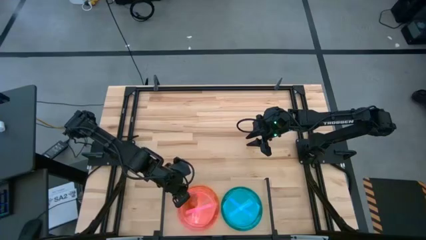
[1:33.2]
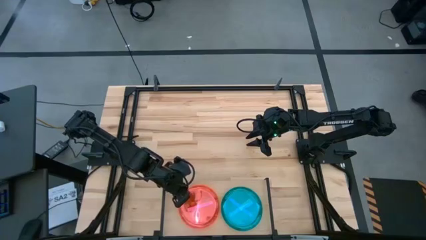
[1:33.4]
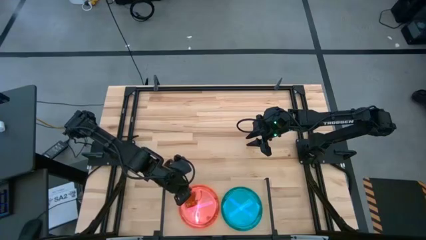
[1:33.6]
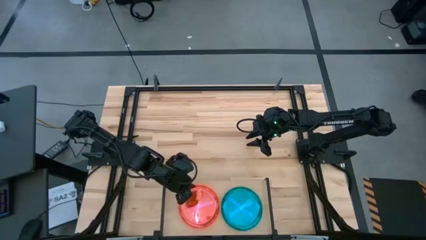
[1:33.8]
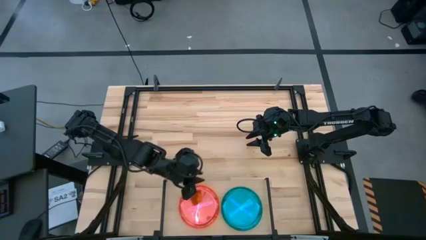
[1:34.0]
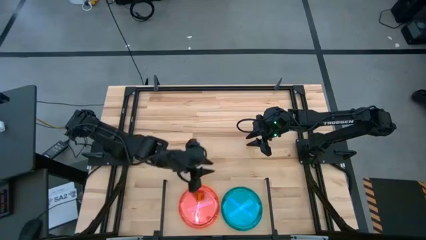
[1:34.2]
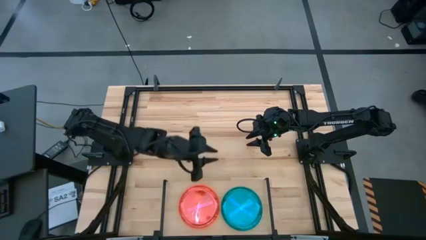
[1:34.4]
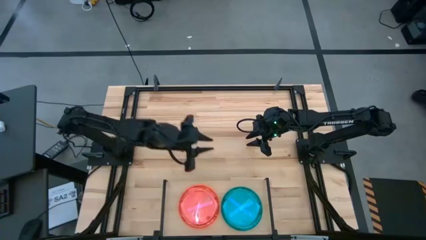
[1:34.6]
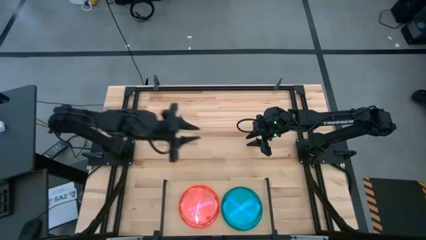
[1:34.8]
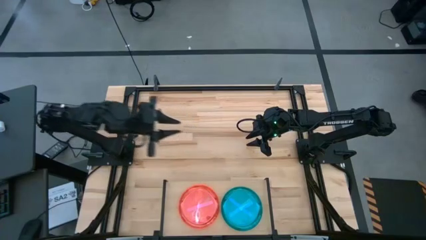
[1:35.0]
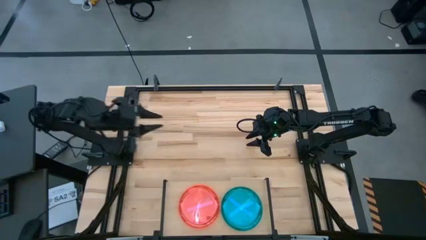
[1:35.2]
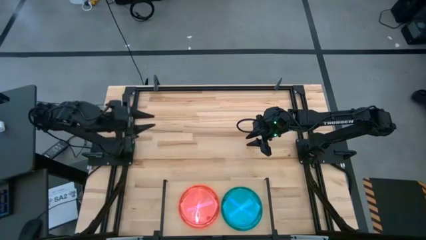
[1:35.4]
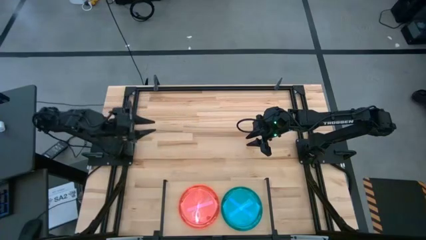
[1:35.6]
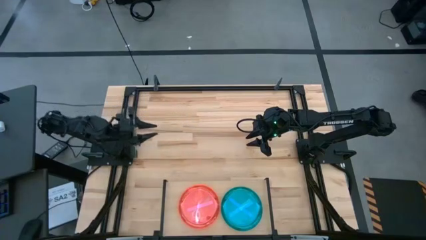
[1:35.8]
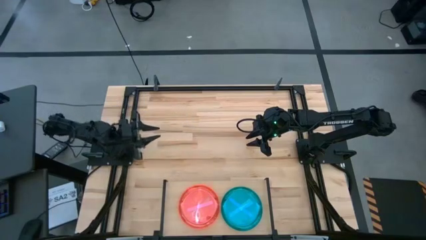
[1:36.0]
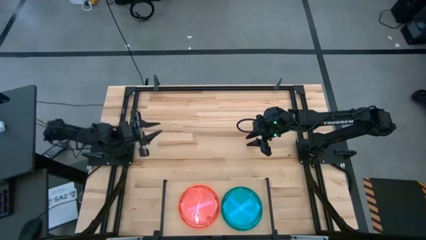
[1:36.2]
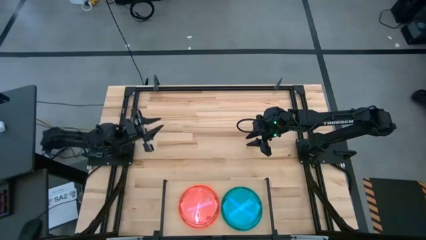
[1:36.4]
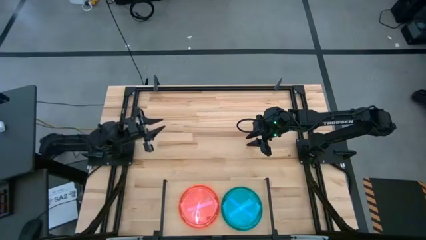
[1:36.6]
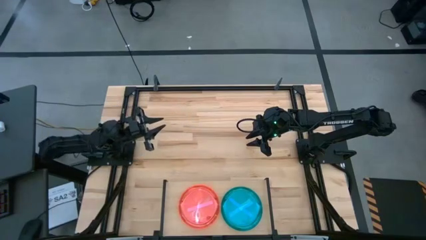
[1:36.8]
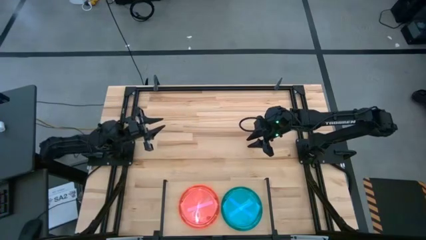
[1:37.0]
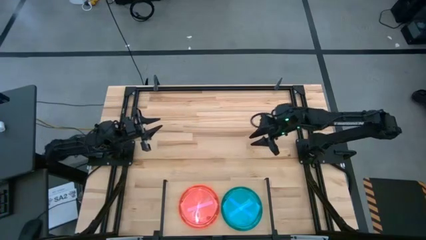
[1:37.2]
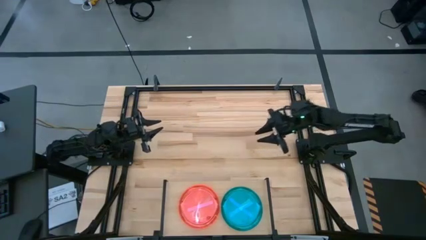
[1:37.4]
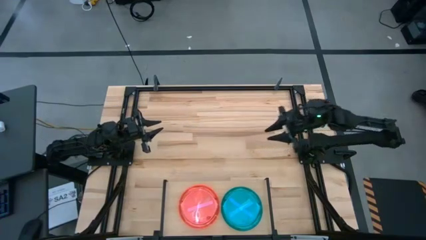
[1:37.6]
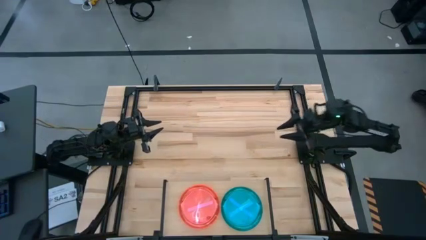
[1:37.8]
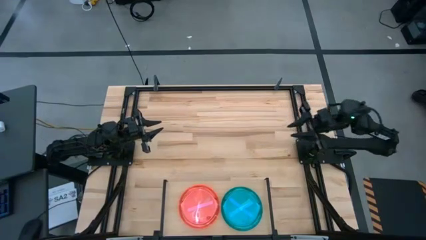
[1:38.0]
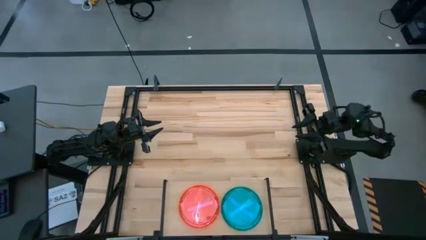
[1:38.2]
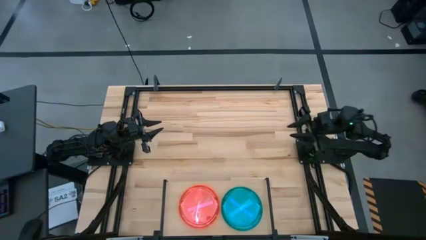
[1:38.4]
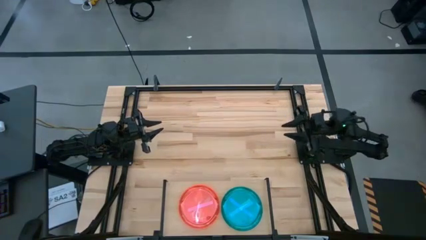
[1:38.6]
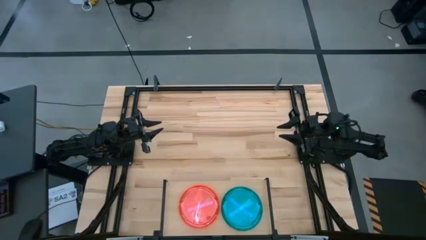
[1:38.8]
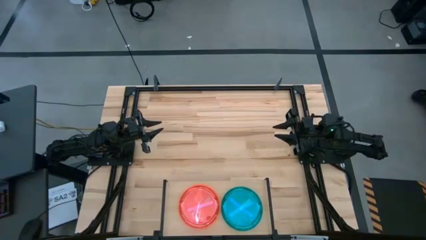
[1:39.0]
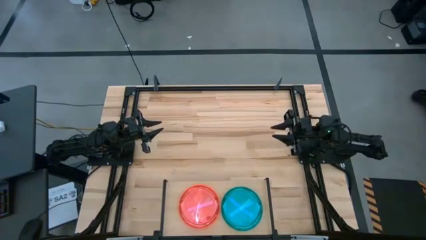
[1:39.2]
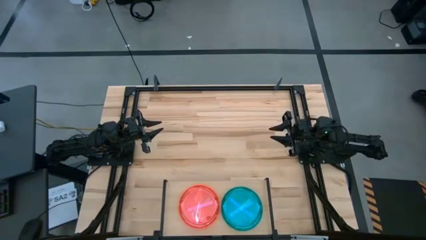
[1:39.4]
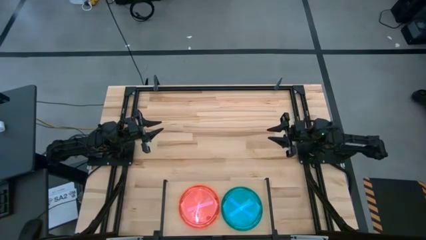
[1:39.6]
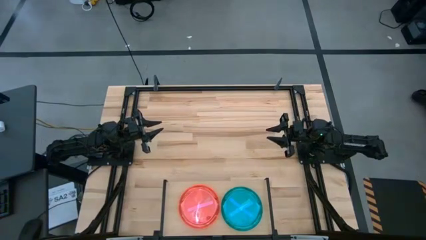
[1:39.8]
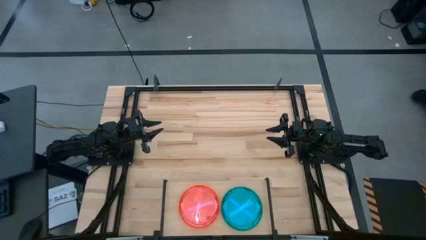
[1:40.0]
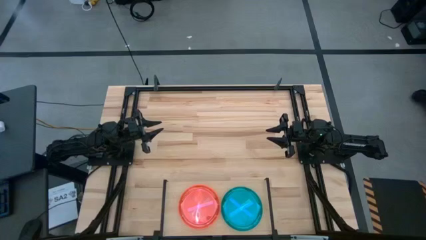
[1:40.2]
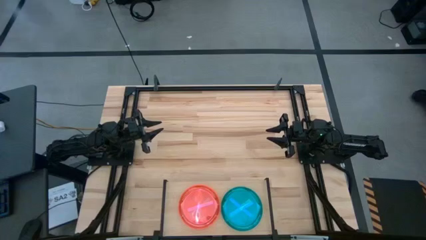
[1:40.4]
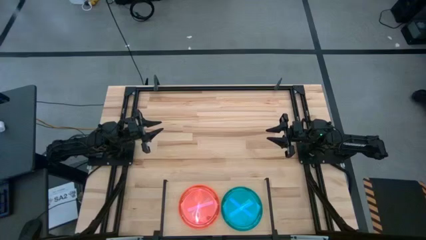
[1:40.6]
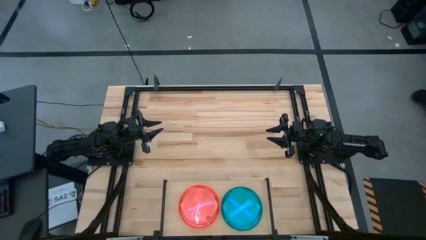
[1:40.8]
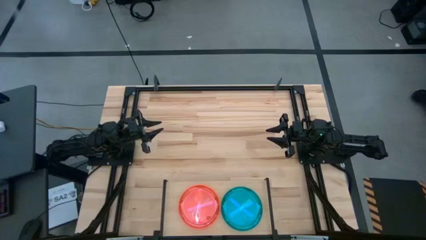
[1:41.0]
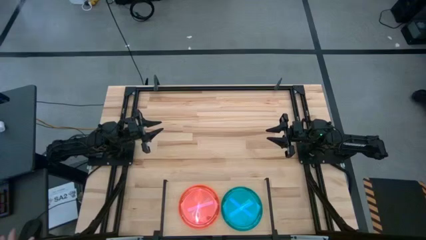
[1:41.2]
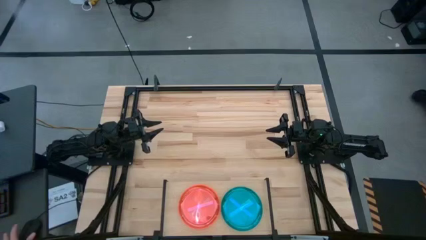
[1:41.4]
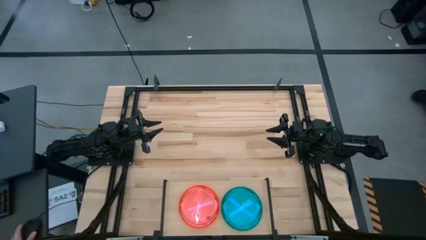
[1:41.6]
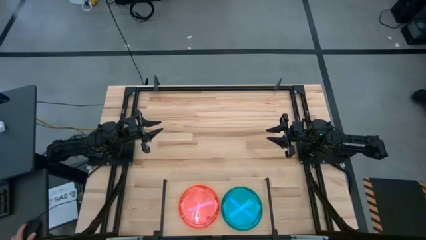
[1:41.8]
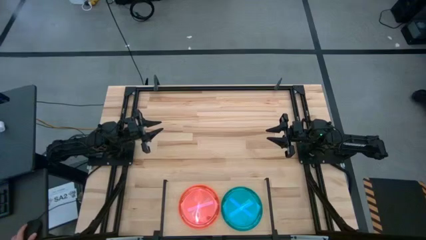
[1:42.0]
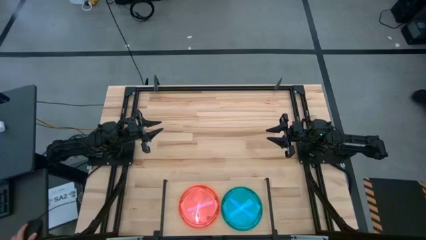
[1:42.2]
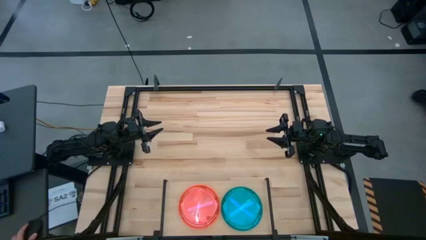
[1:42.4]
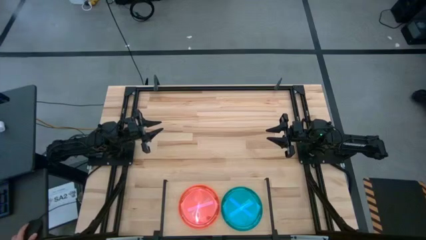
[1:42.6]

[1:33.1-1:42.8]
Task: Place and stack plates onto a shelf
Return to Home Position

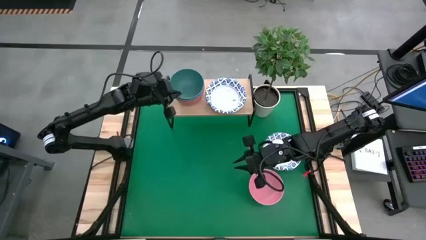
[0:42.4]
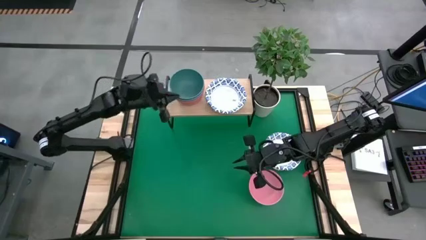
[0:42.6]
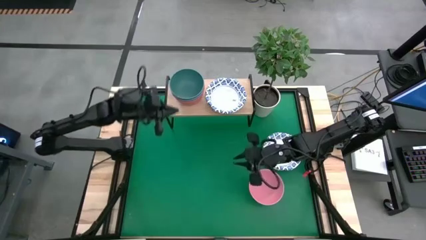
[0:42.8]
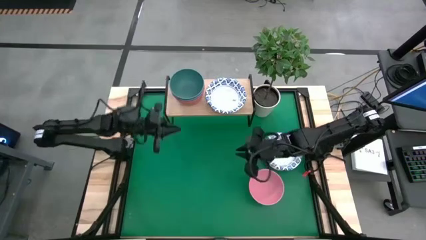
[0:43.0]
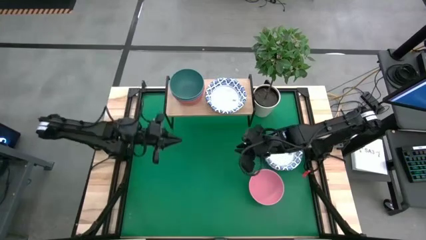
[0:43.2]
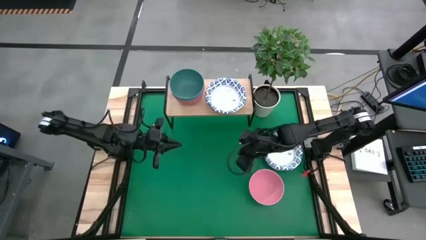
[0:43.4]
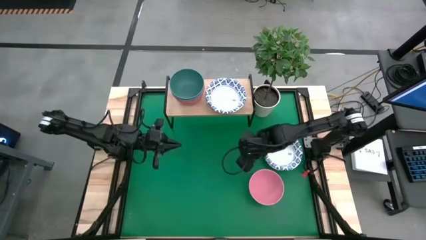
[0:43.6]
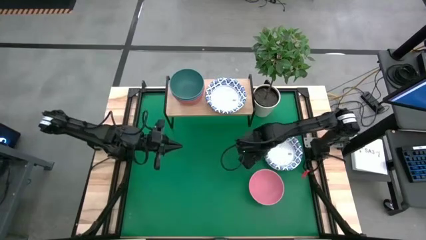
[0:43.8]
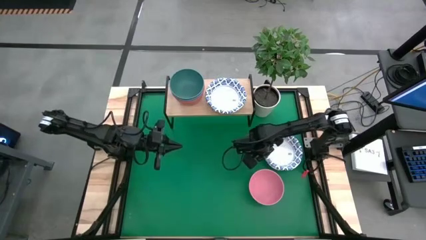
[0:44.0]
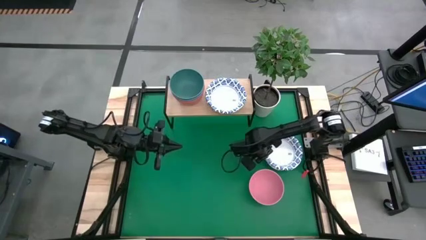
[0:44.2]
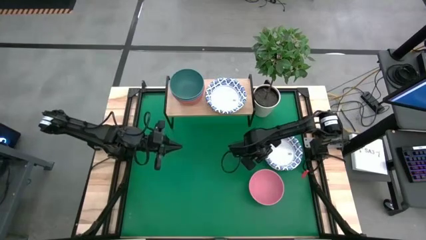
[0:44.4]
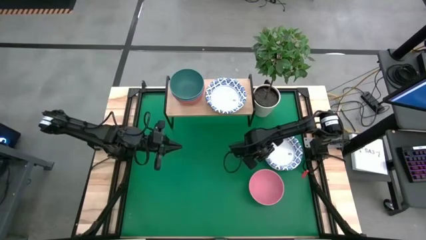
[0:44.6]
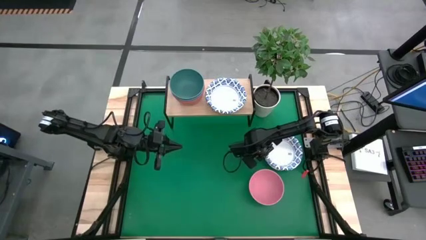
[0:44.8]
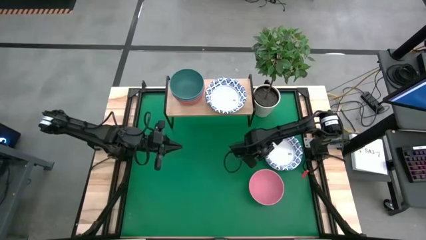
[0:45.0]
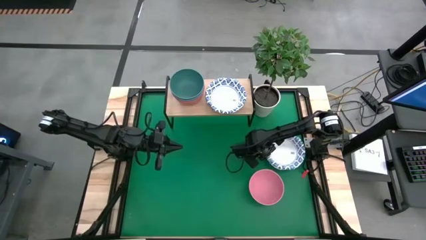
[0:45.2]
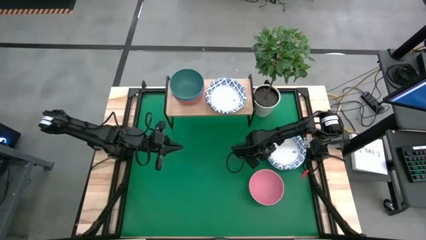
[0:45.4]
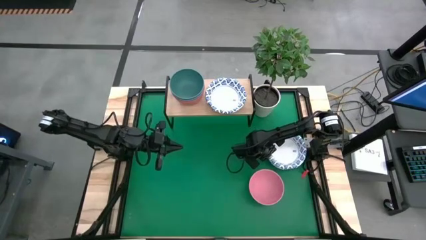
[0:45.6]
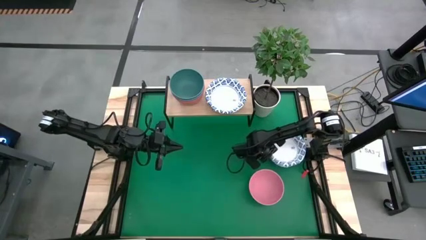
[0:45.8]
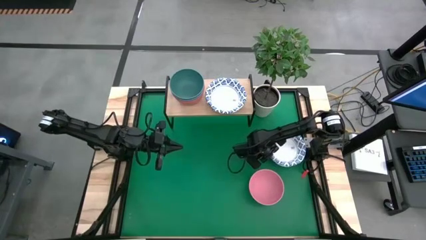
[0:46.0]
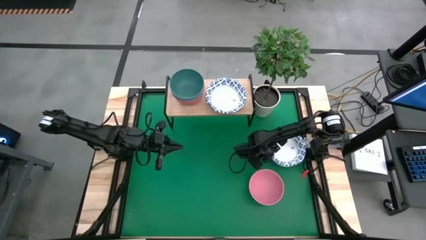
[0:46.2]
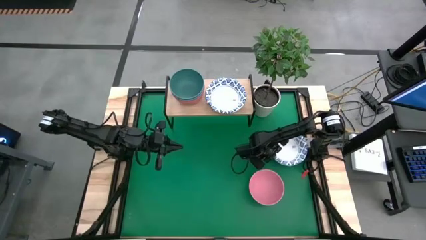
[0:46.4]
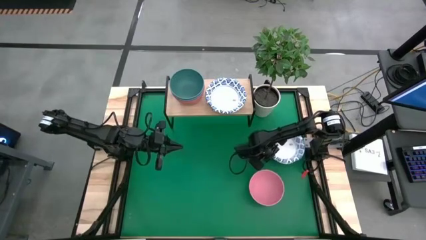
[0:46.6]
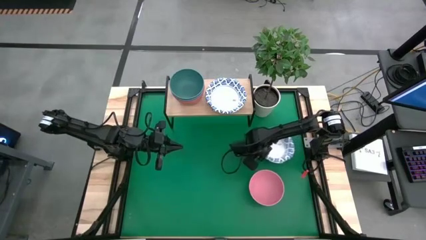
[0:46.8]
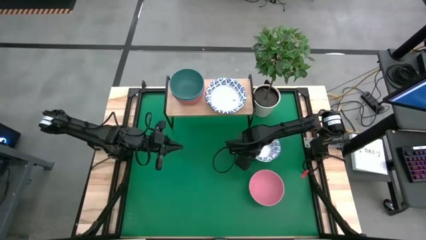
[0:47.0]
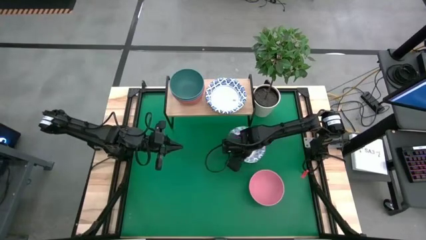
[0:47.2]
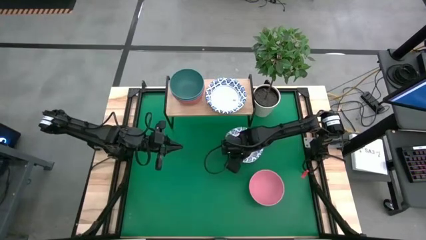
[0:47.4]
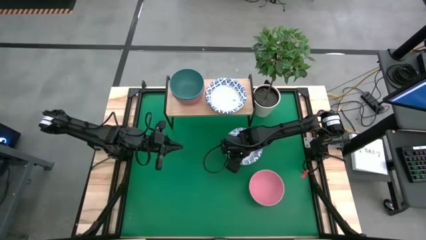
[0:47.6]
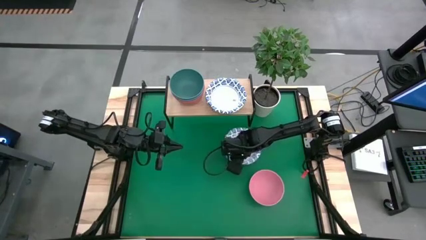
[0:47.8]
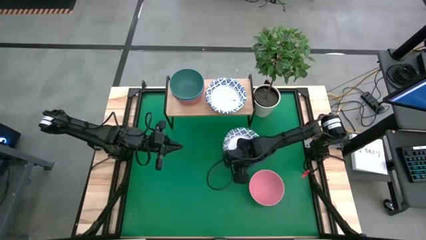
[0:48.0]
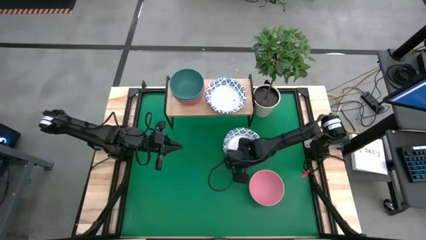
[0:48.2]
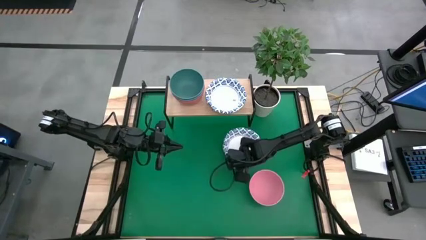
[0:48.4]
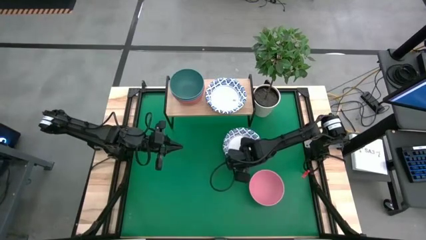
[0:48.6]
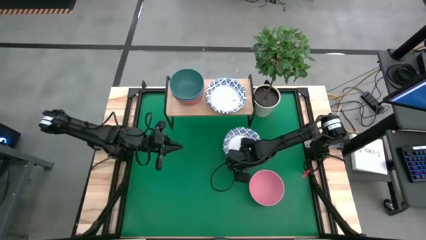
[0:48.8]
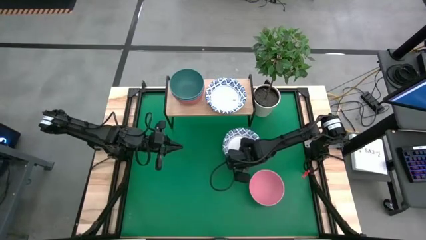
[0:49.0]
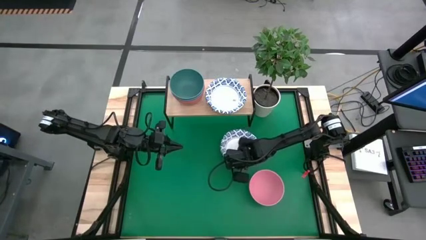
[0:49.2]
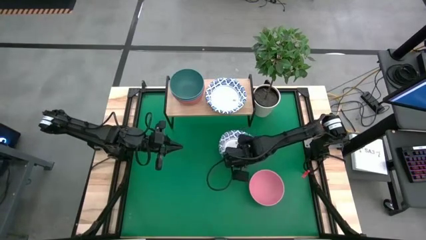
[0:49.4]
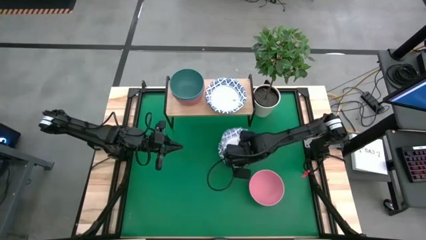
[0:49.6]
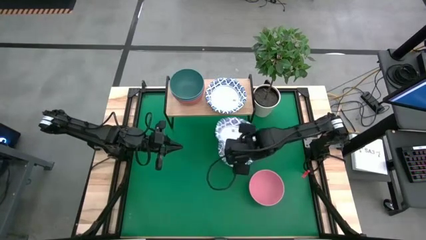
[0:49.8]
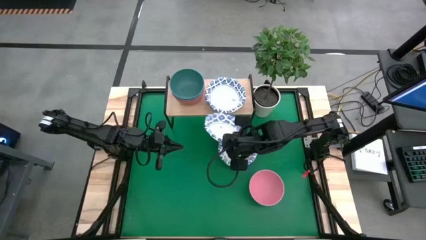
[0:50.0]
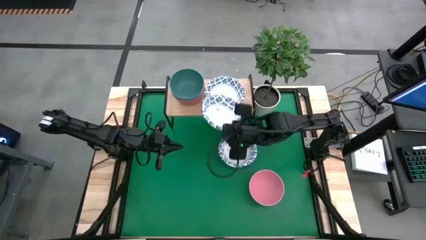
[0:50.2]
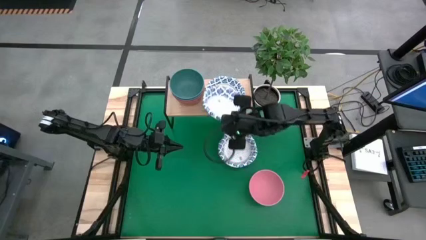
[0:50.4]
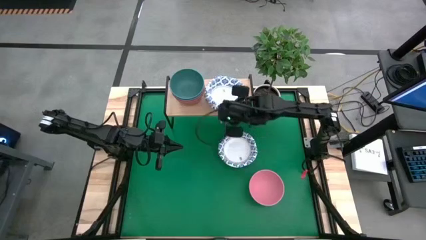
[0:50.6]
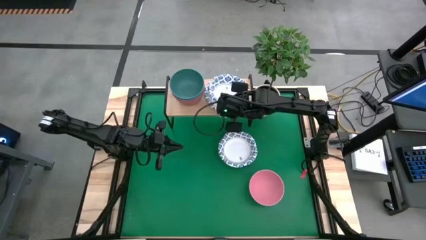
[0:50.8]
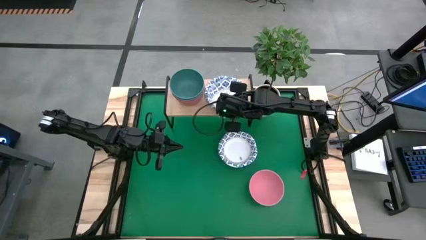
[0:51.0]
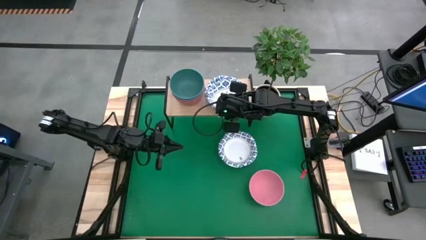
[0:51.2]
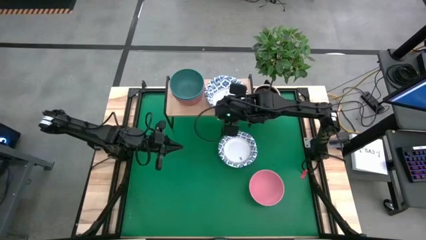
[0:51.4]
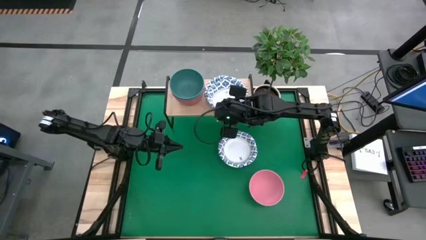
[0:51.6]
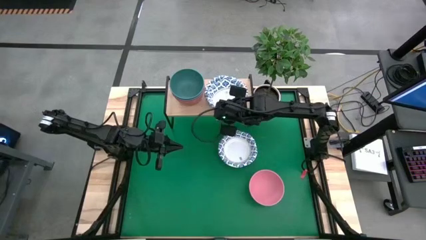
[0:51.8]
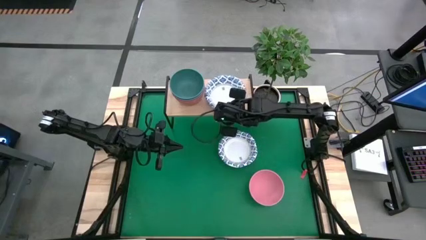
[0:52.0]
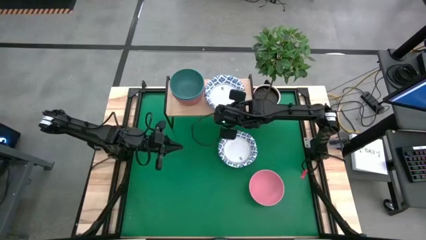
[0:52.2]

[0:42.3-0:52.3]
Task: Place and stack bowls onto a shelf
Stack the white patterned bowl on top of the other white patterned bowls on the shelf
